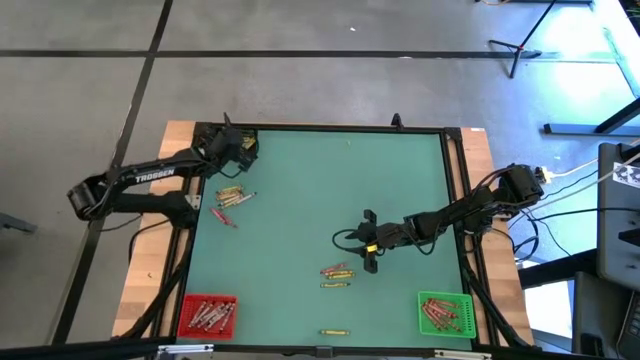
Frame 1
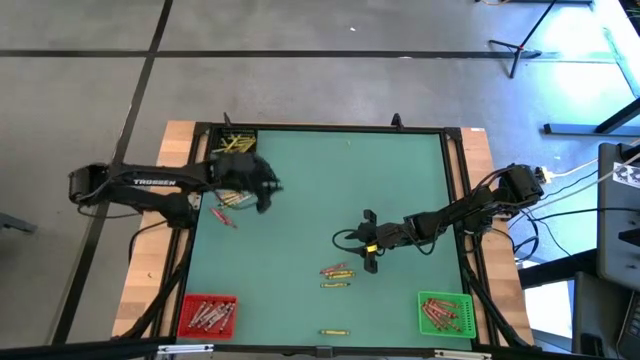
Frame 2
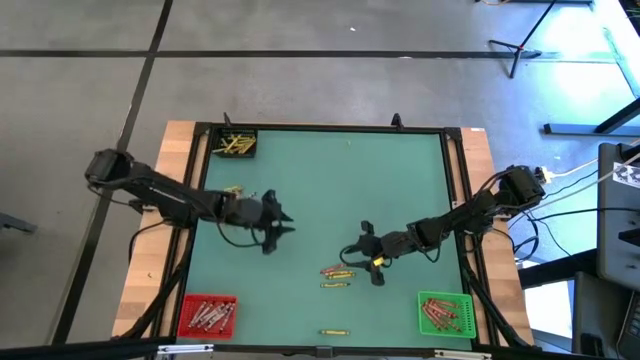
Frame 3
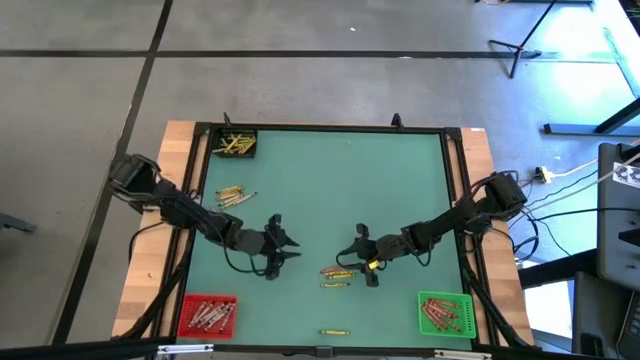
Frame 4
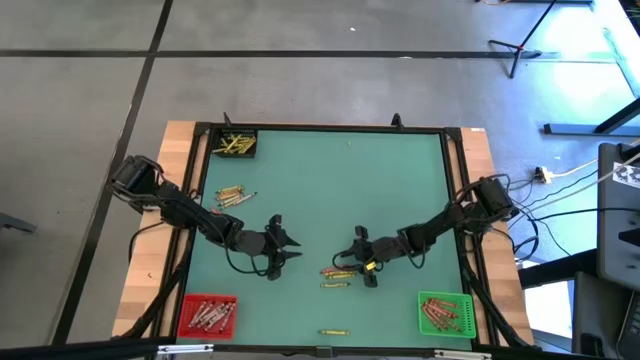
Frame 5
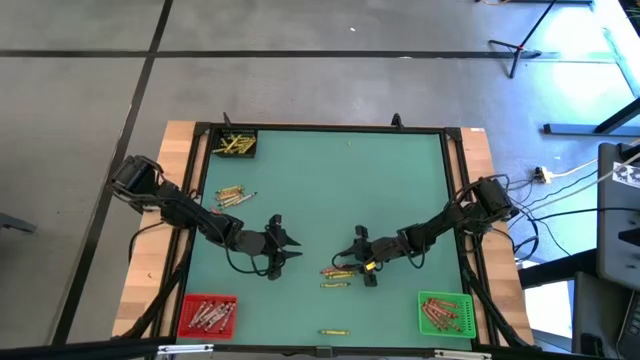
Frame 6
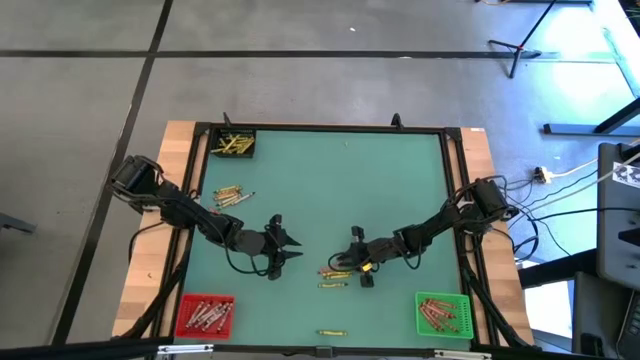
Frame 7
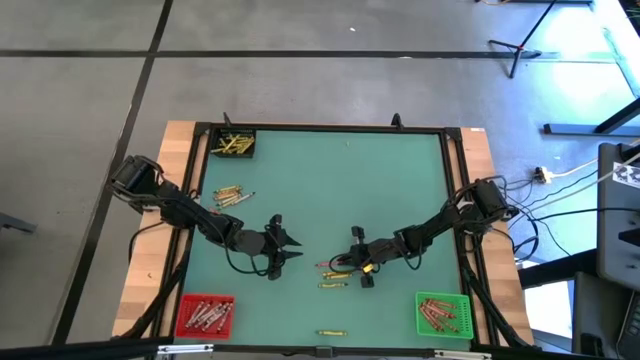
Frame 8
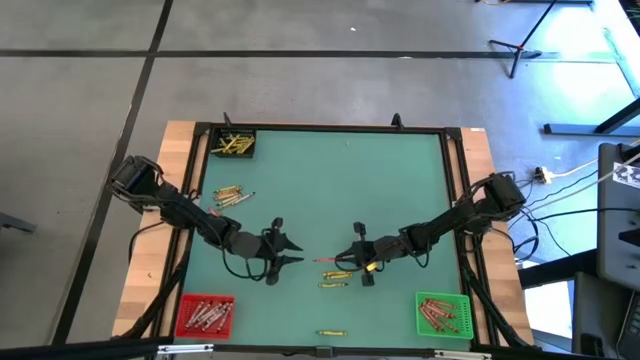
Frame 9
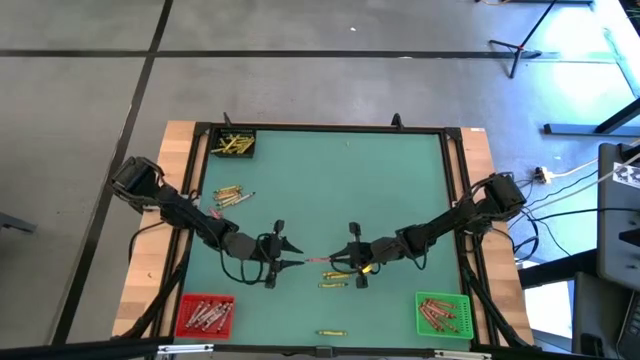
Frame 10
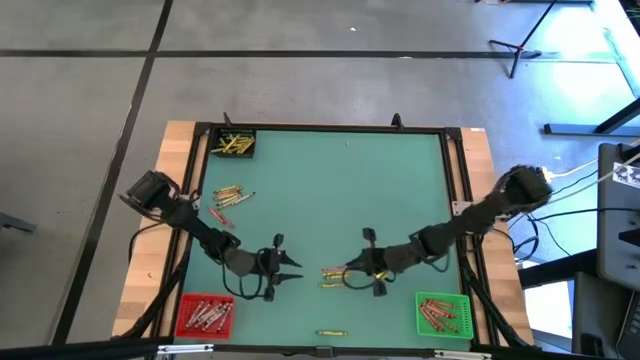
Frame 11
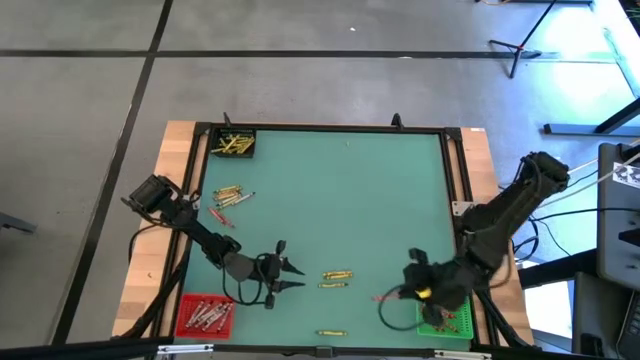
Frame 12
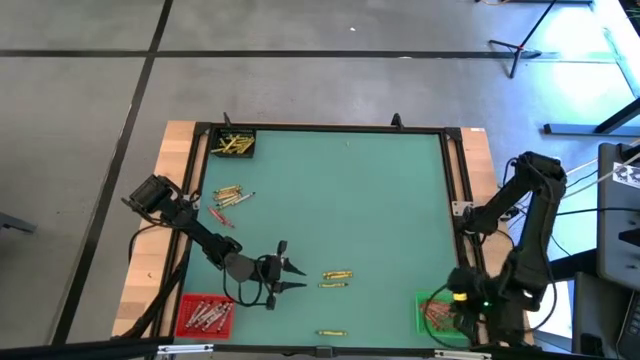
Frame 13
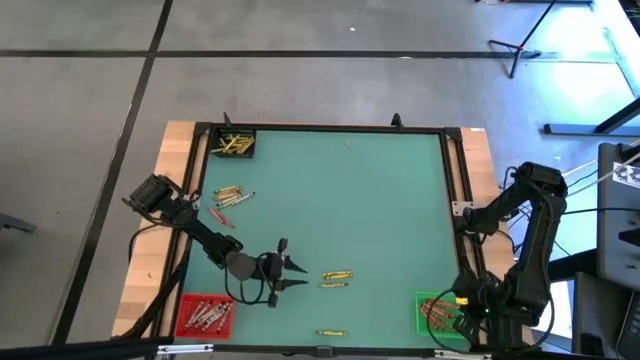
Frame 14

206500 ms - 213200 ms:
Task: Sort crayons
Put the red crayon into the green bin

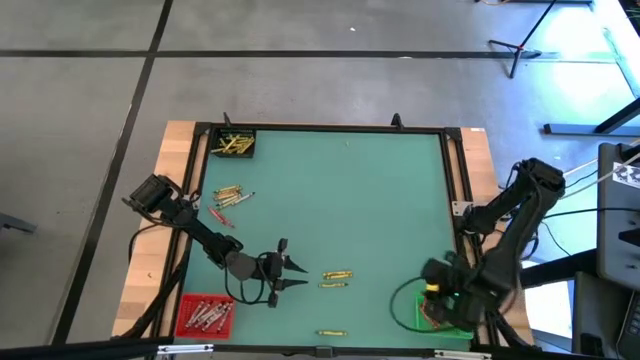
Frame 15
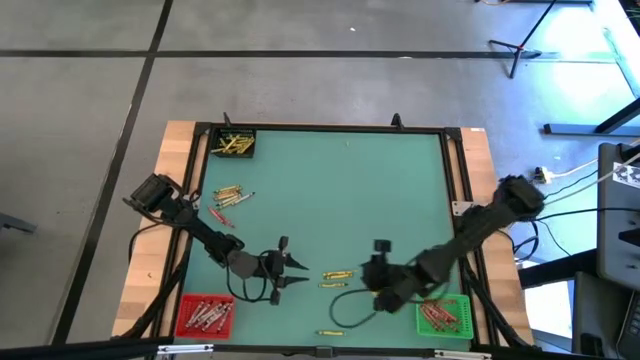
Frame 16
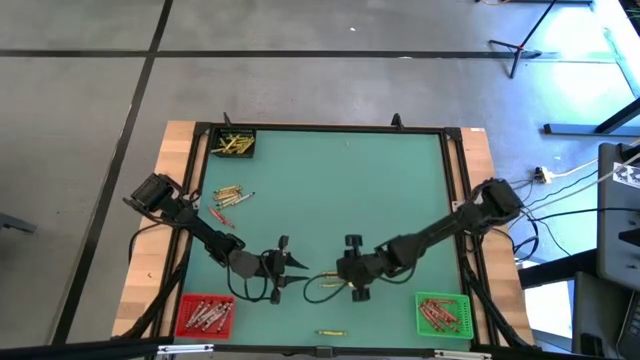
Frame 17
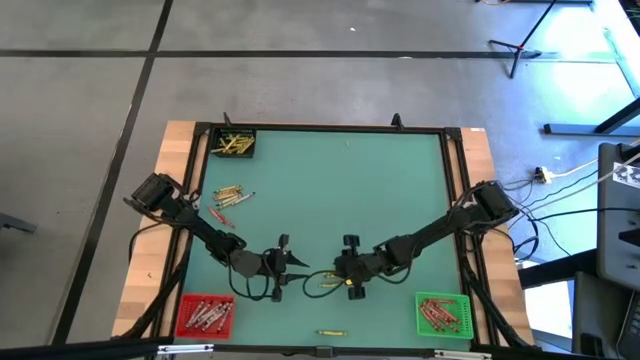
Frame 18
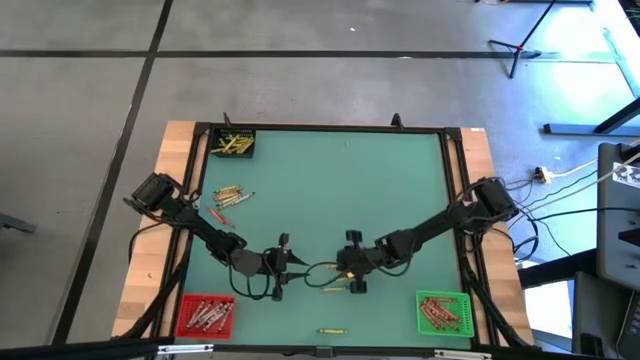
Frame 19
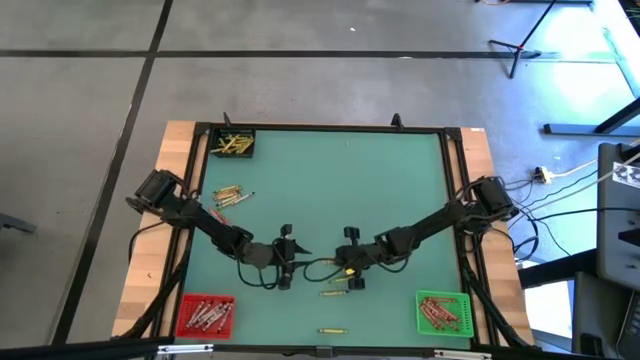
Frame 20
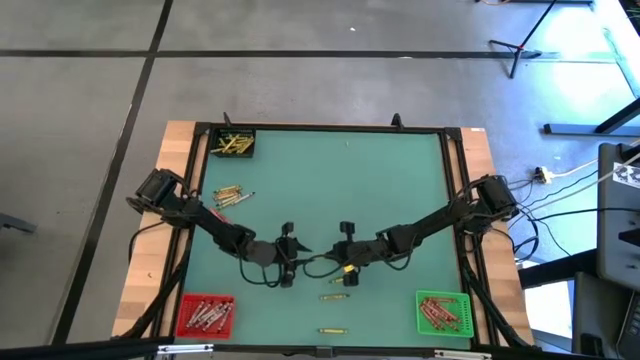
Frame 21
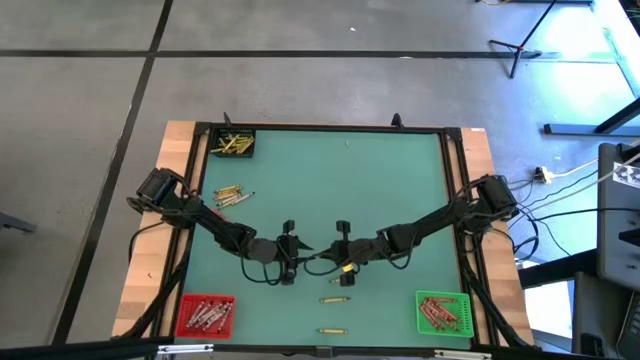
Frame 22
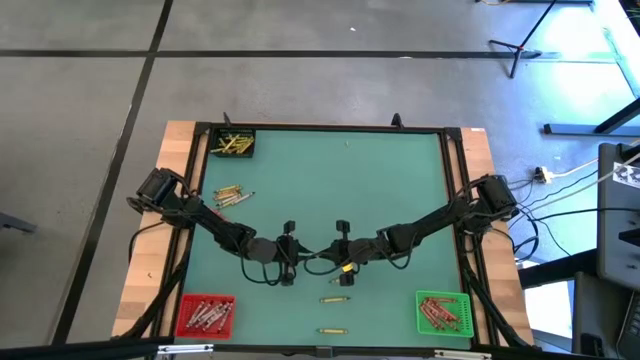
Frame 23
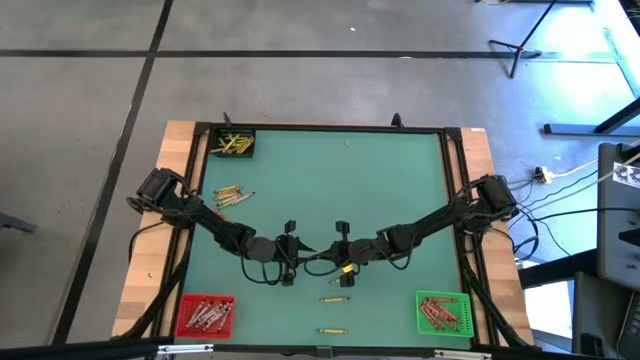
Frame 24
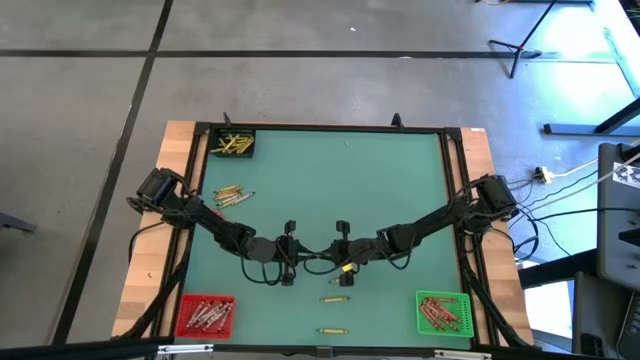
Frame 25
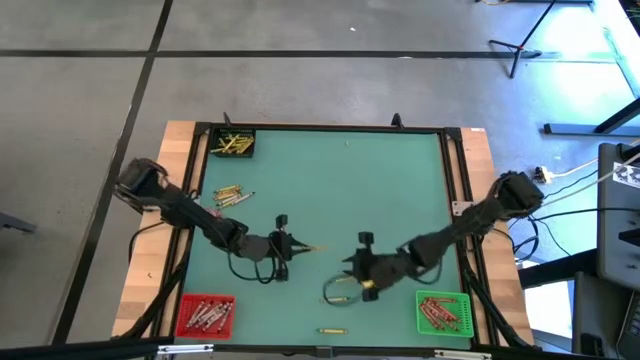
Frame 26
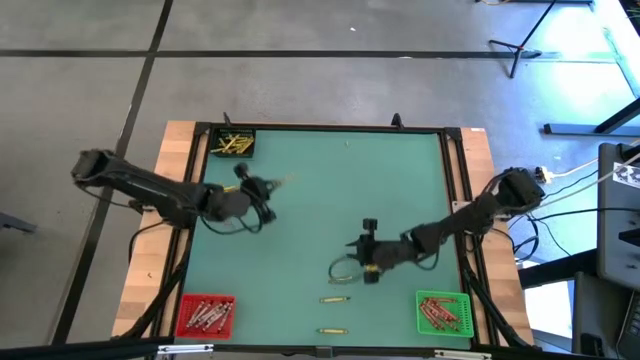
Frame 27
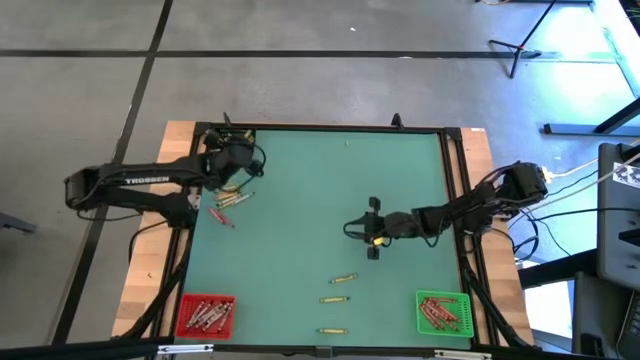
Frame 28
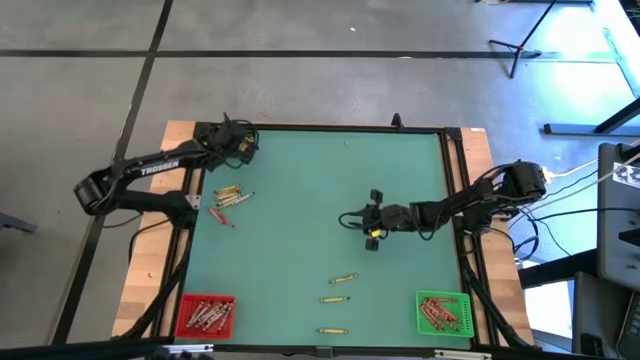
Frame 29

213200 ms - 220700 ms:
Put the bottom yellow crayon into the black bin

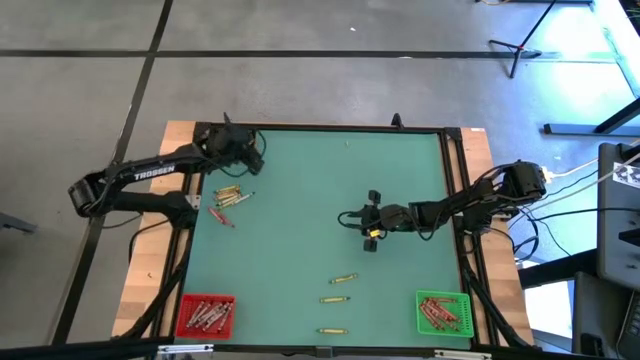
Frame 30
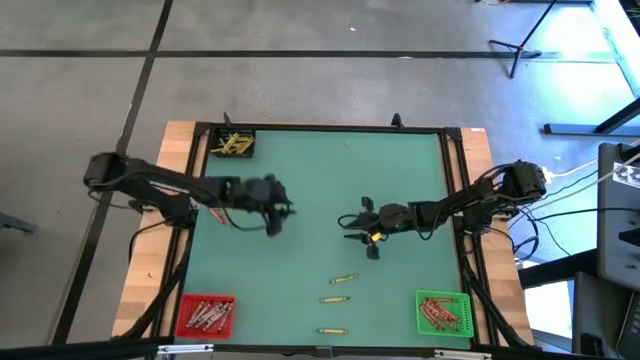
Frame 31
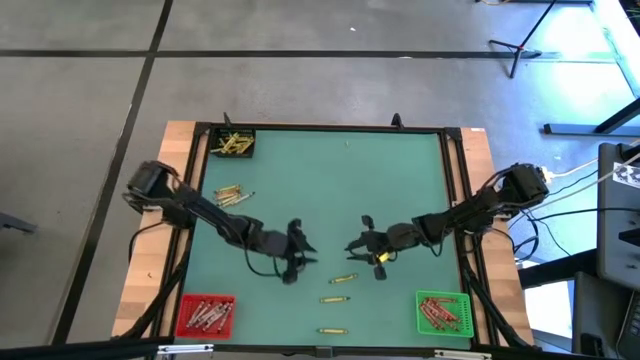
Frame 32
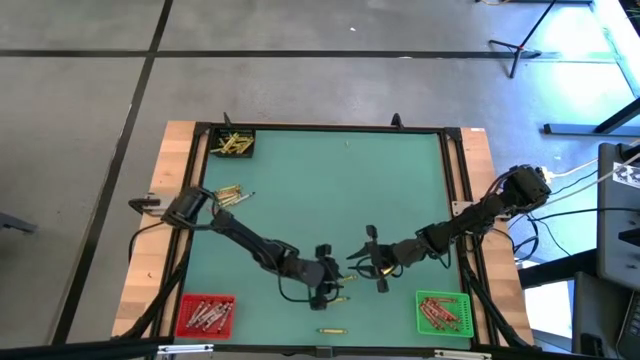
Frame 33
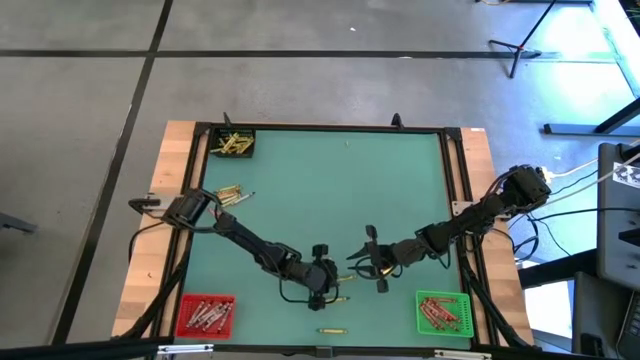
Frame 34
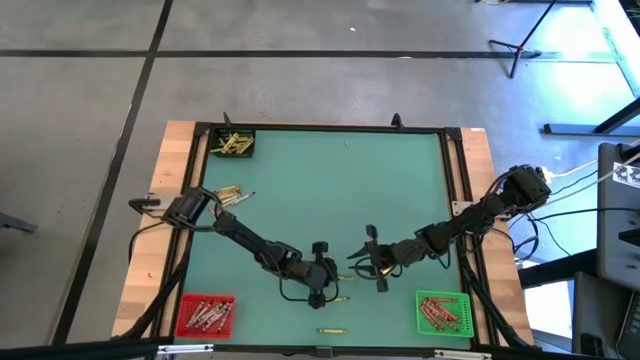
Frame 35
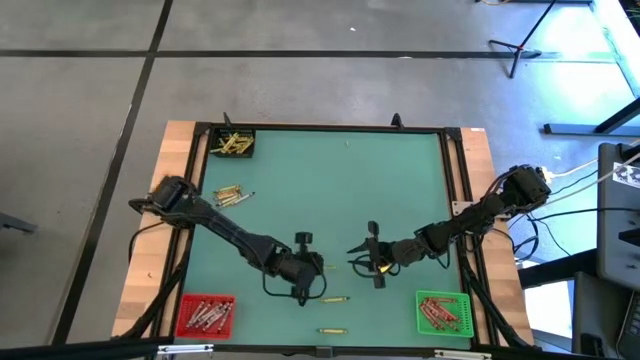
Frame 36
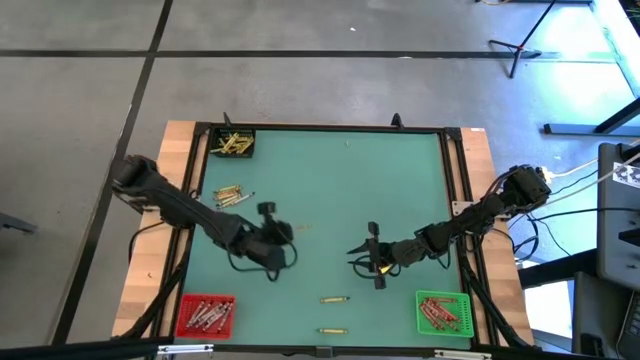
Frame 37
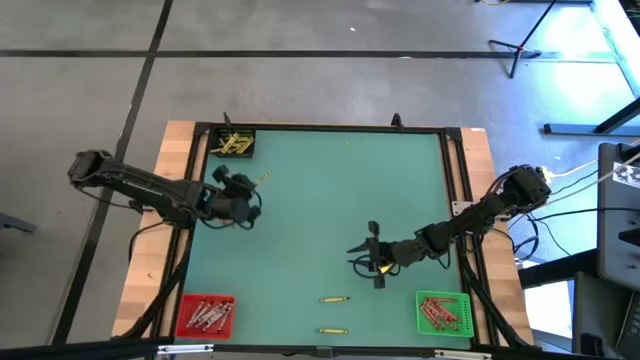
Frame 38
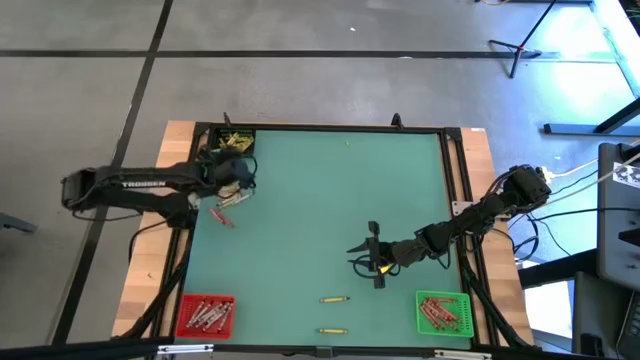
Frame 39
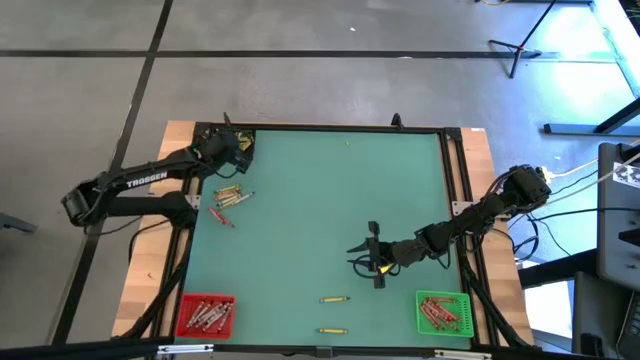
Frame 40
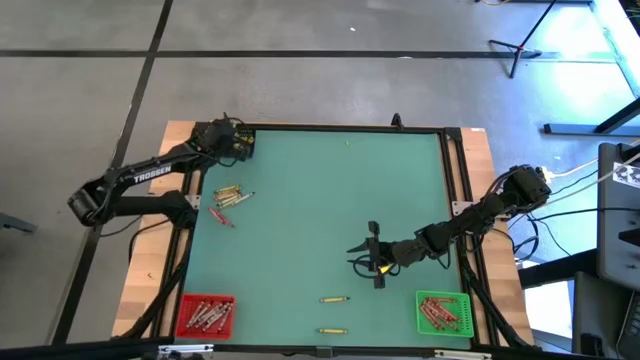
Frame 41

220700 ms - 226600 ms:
Put the green crayon into the black bin
